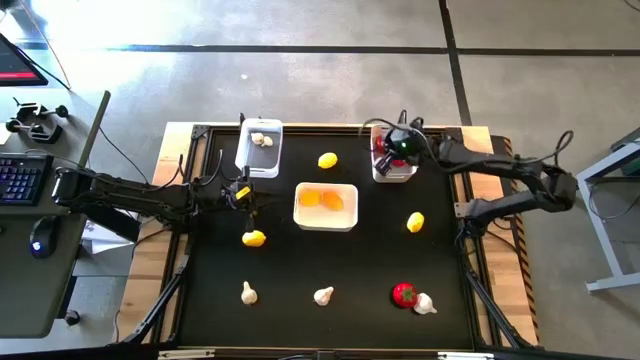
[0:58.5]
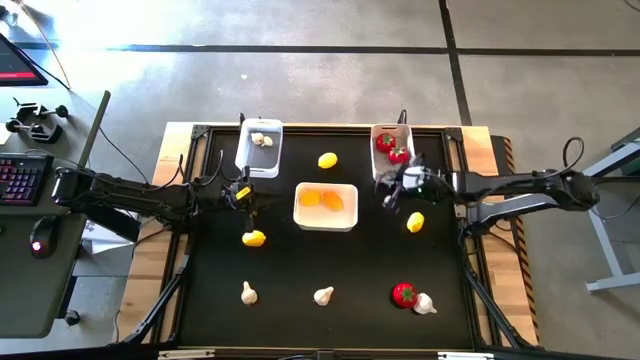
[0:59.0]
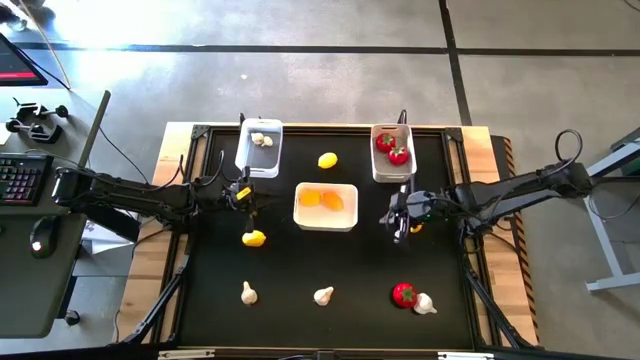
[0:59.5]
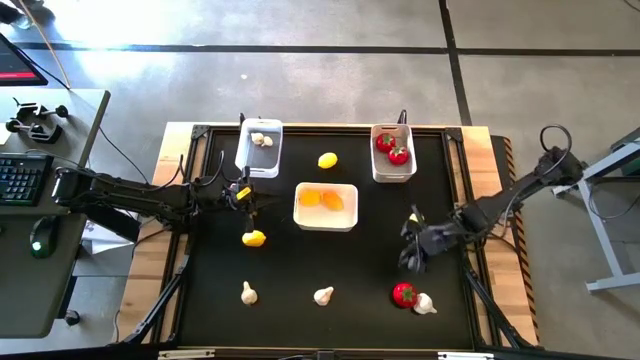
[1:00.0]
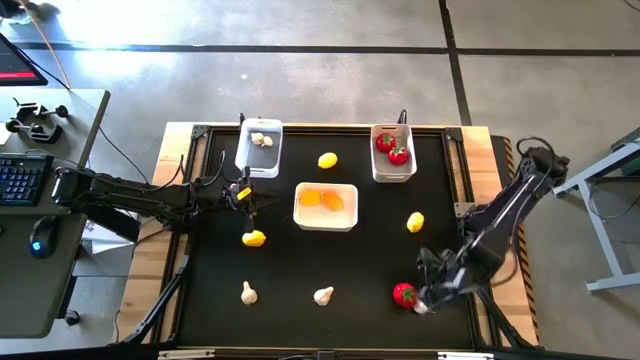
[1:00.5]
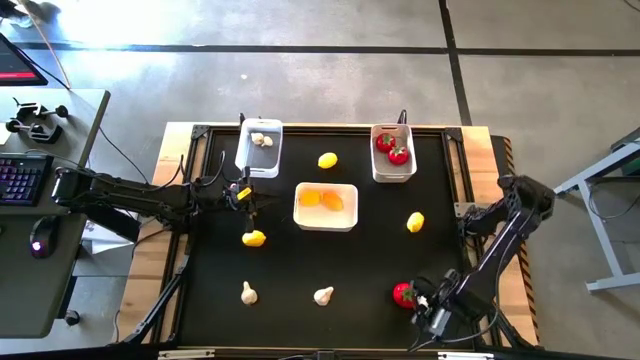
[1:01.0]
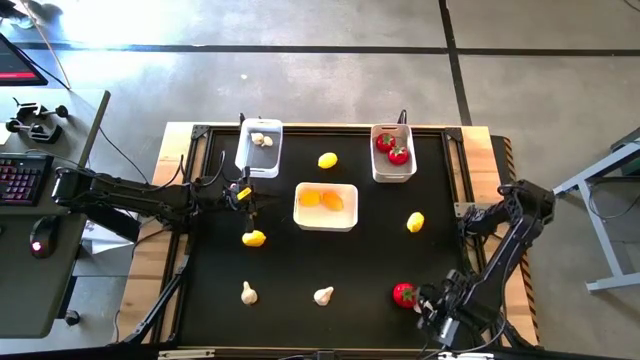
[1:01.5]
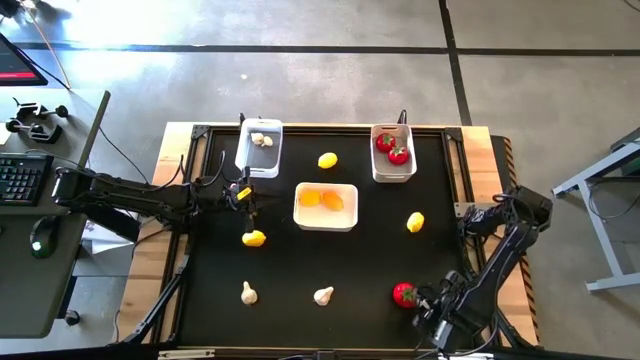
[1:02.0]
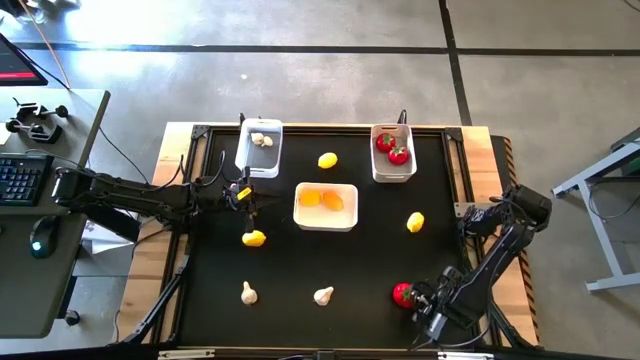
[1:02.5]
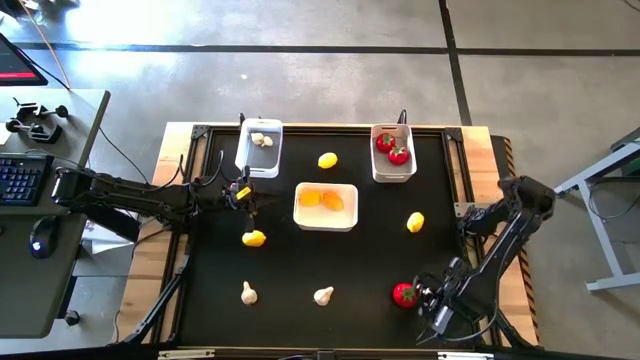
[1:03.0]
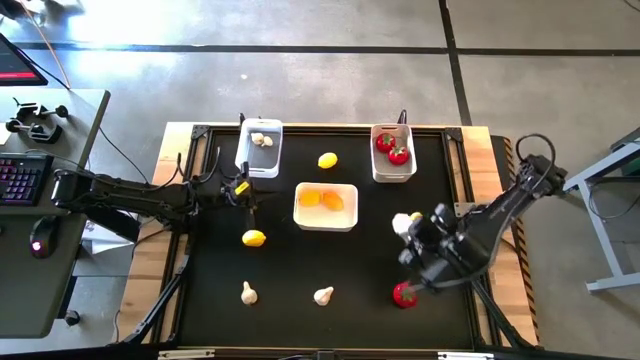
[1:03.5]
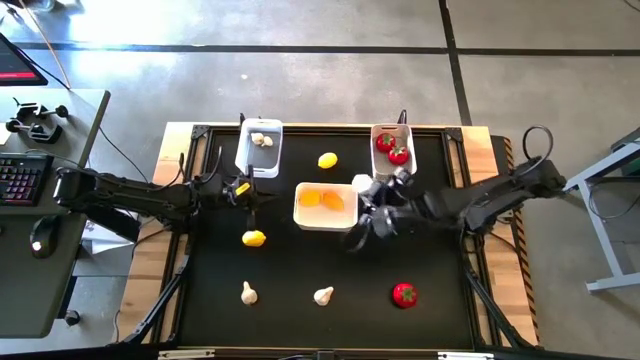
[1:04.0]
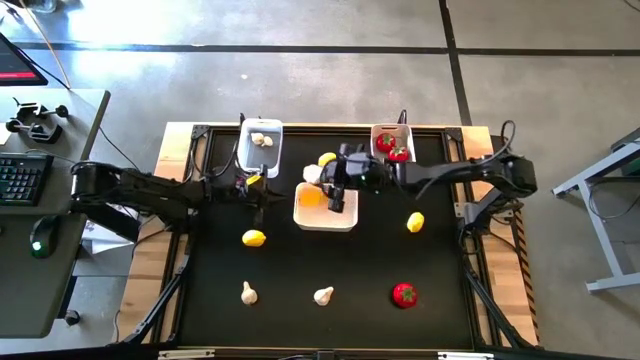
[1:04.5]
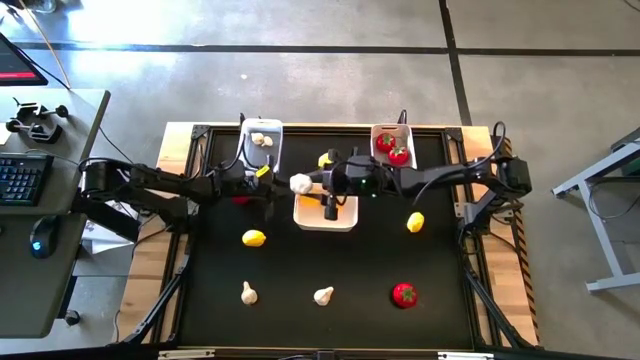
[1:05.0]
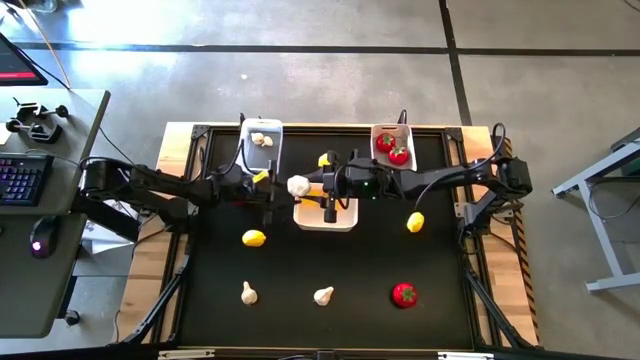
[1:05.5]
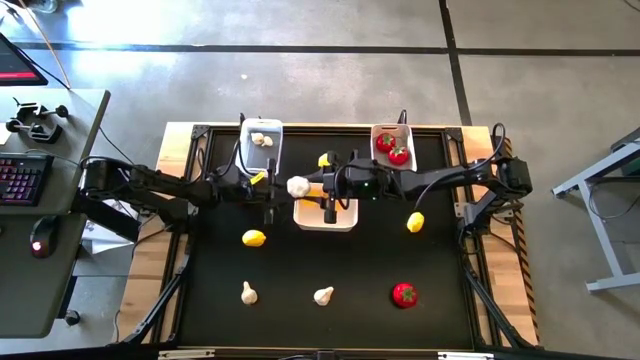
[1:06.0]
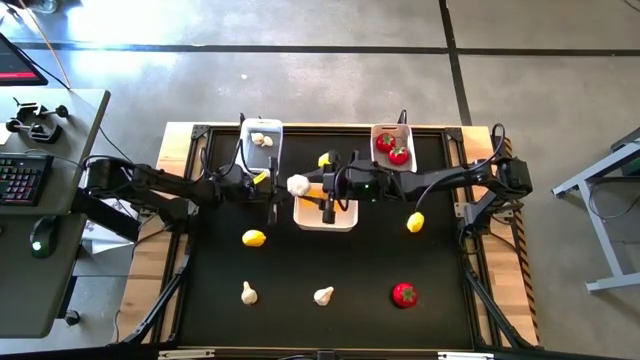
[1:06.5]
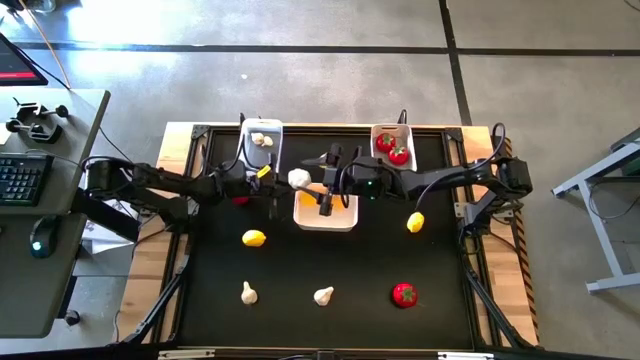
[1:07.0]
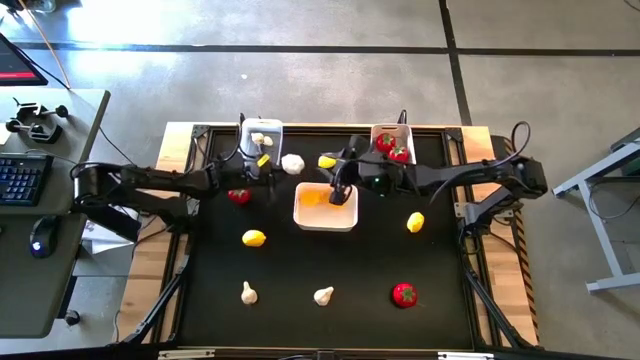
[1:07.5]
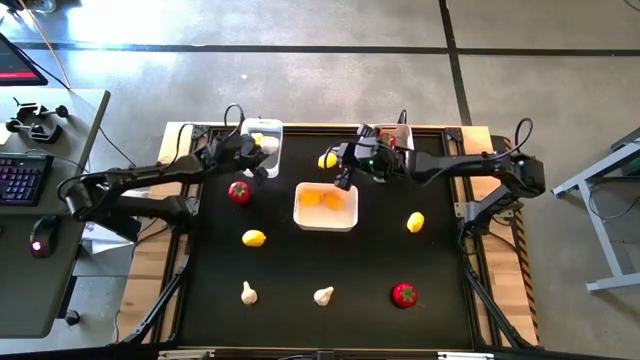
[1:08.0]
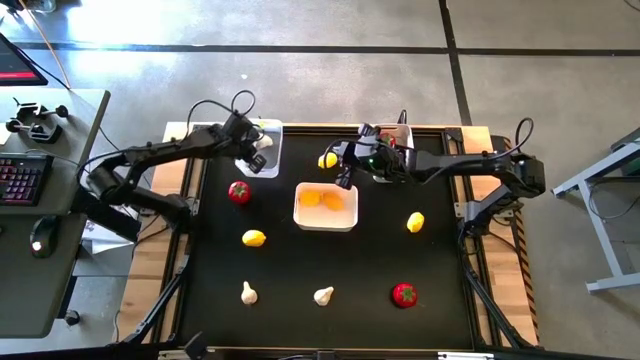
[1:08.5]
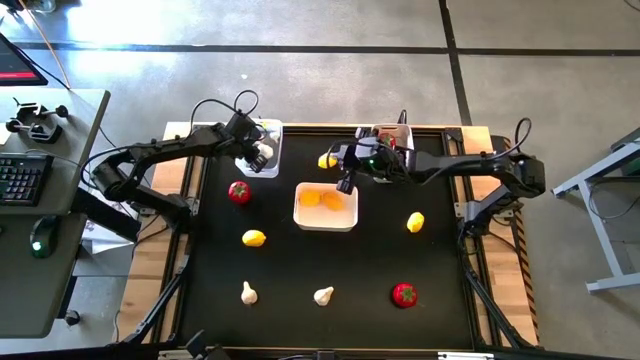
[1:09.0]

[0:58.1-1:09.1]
Task: Sort produce into baskets
Put the white garlic into the transparent bin

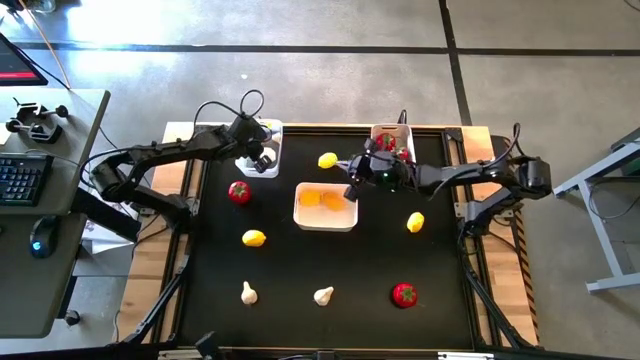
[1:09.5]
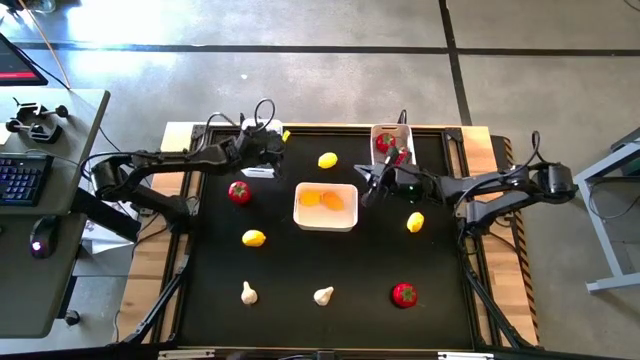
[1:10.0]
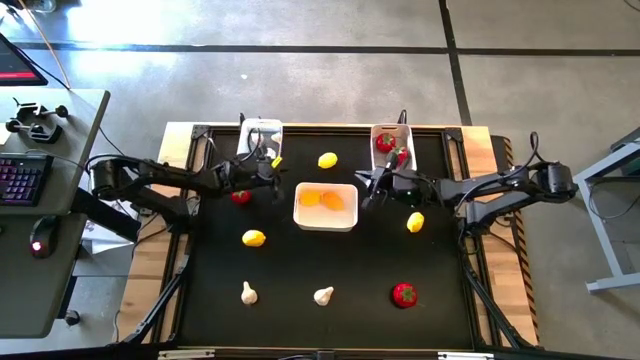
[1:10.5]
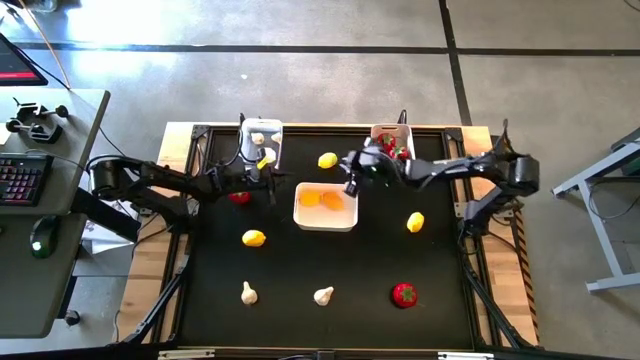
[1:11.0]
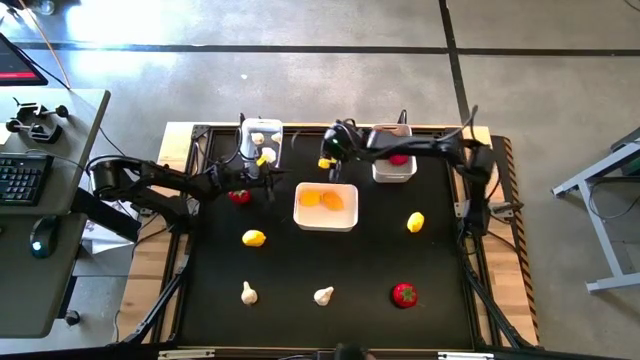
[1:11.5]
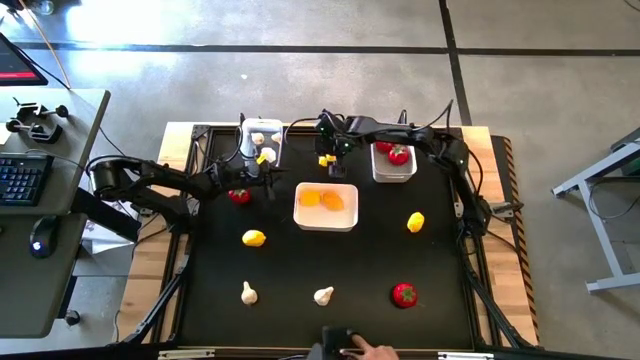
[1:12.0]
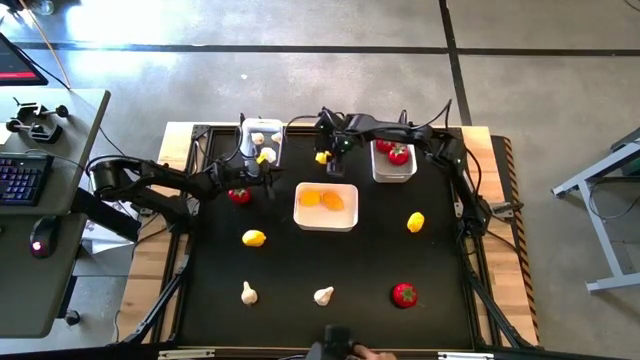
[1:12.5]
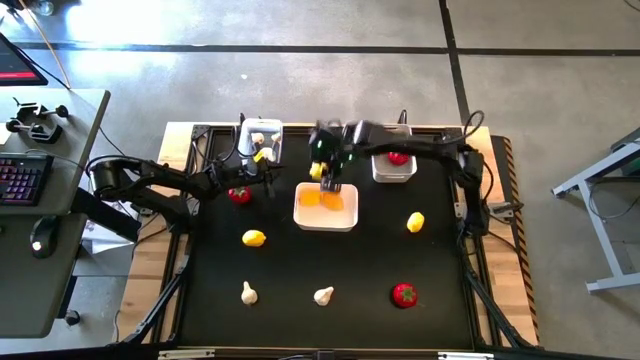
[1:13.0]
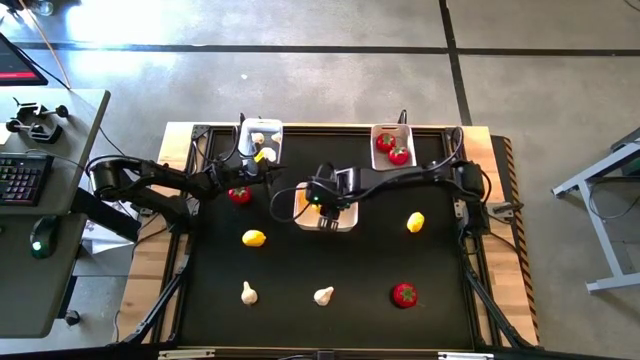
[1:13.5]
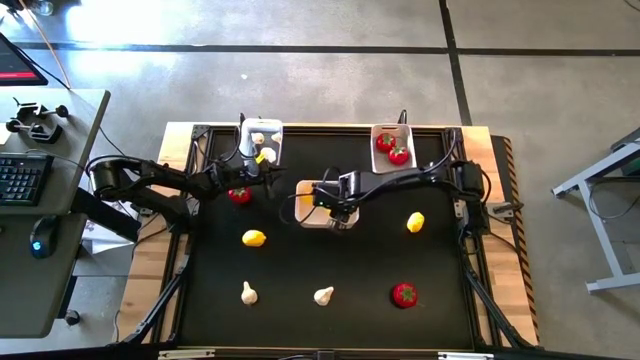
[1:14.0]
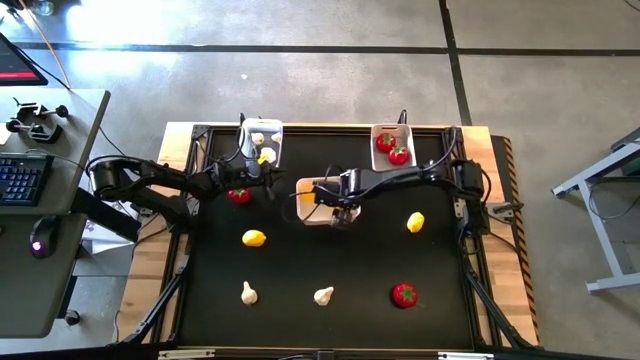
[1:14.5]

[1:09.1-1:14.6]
Put the yellow lemon into the white bin

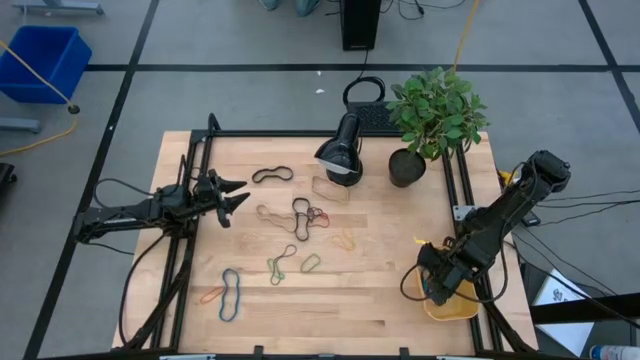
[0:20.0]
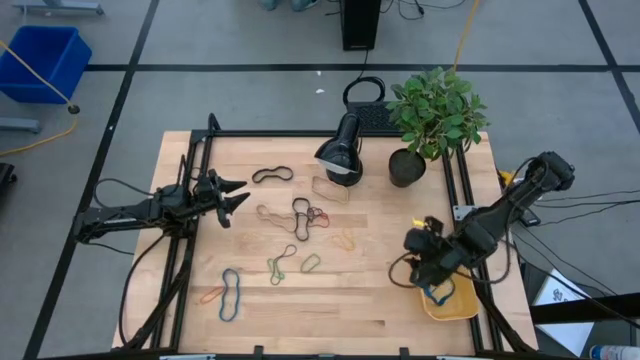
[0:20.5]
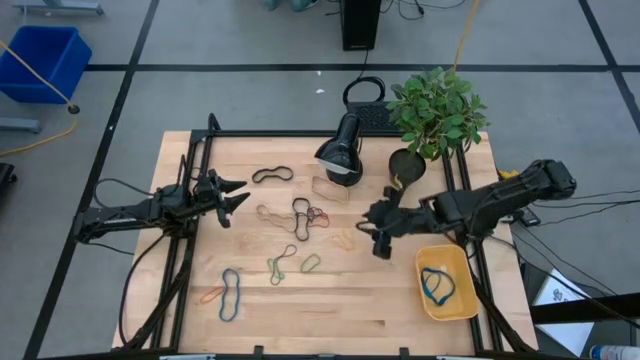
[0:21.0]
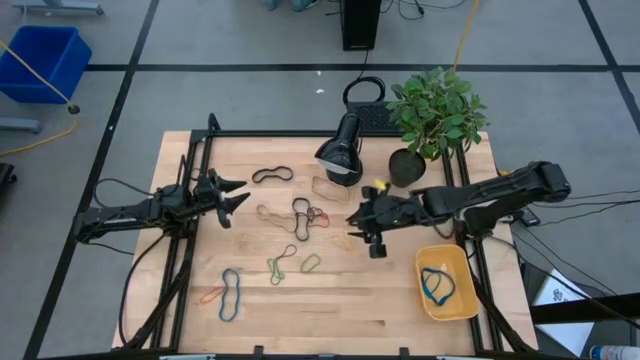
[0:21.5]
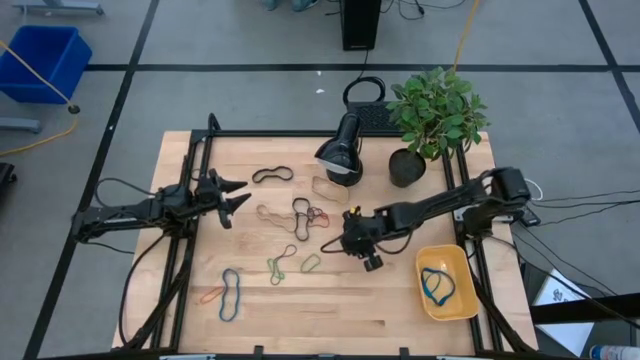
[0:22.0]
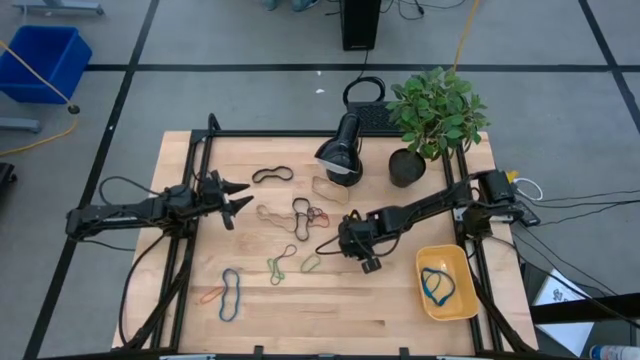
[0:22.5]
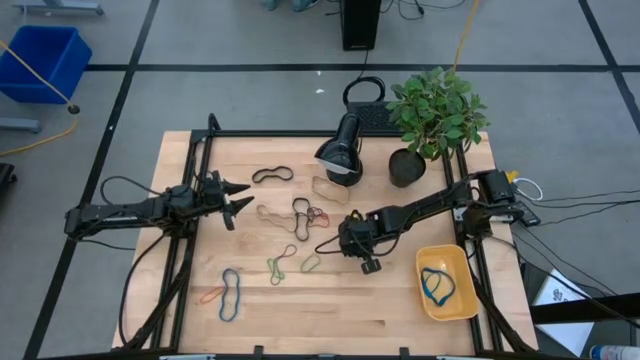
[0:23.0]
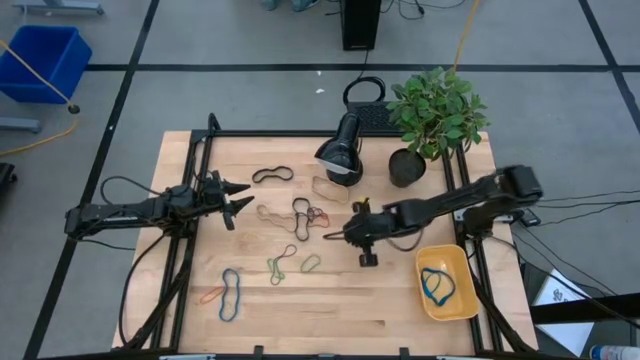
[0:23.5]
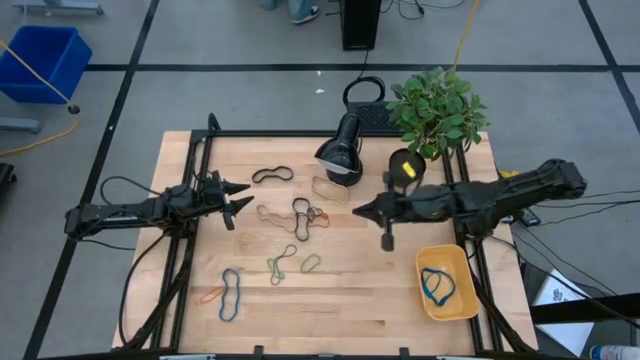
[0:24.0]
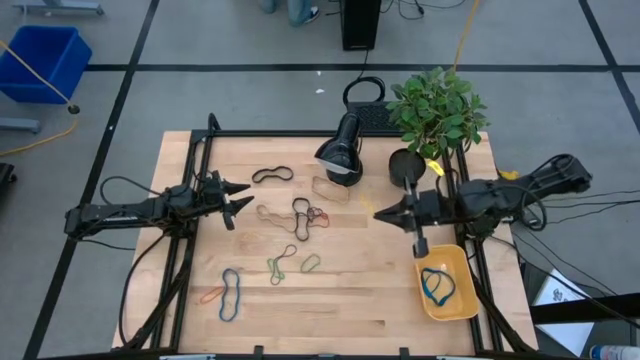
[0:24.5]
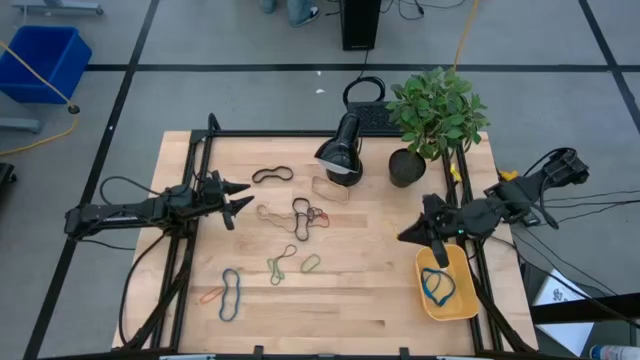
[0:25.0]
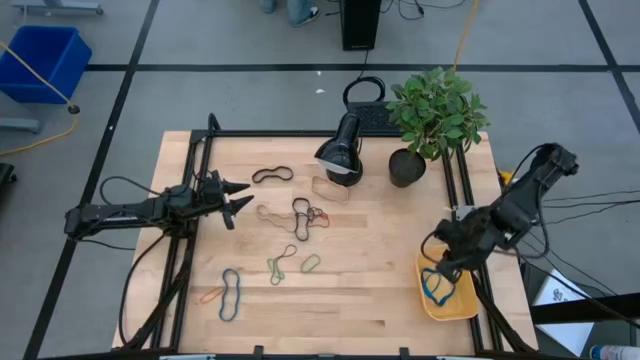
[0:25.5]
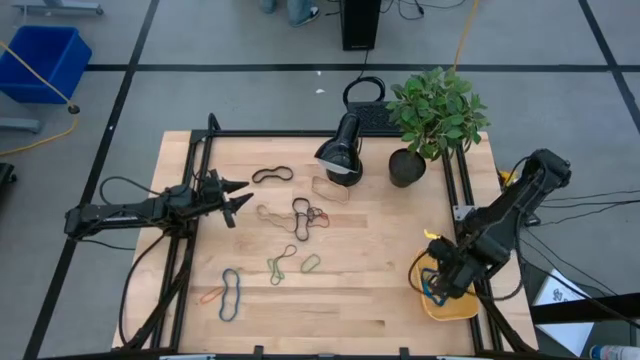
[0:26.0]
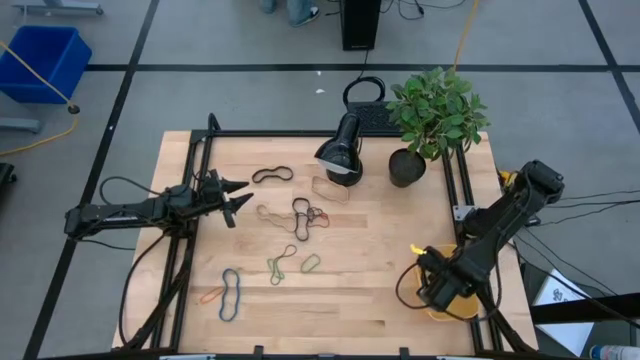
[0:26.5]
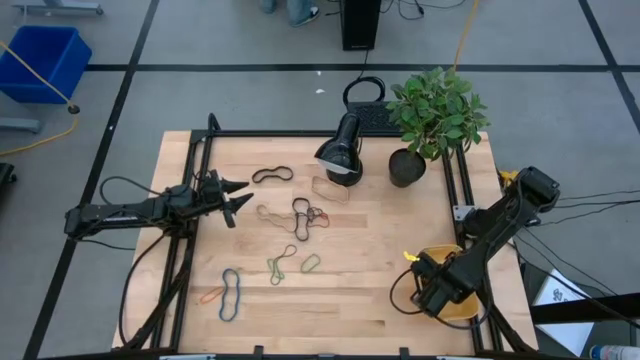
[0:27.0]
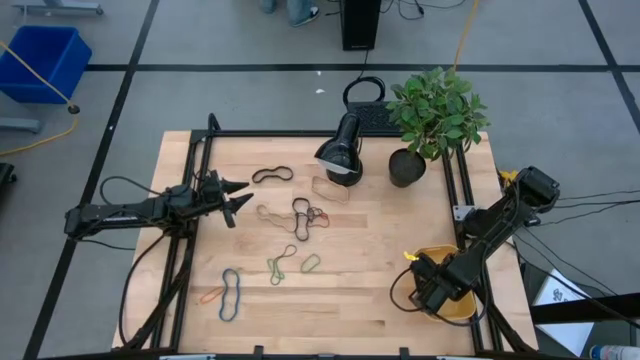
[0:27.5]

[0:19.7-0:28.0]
Task: Pick and place rubber bands into bin
Put the yellow rubber band into the yellow bin
